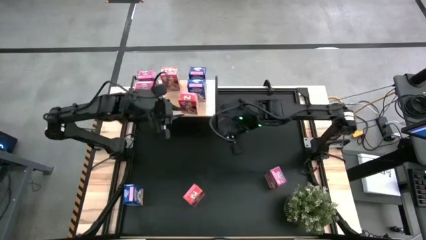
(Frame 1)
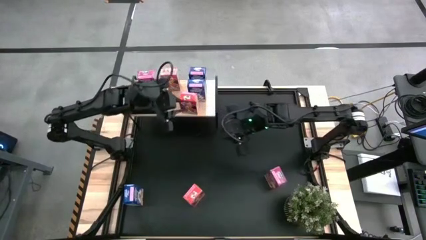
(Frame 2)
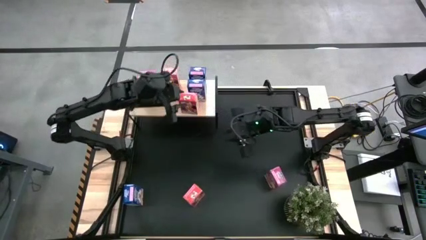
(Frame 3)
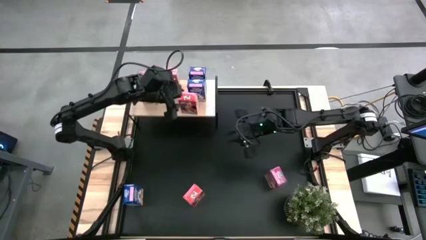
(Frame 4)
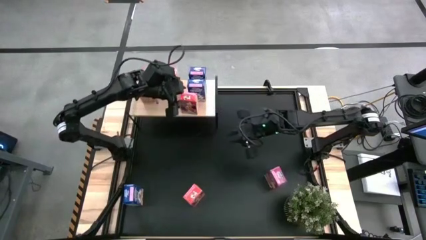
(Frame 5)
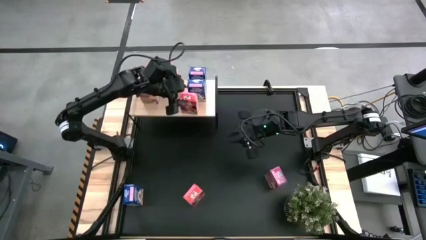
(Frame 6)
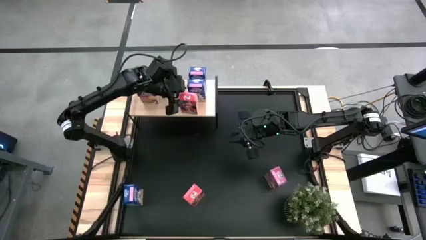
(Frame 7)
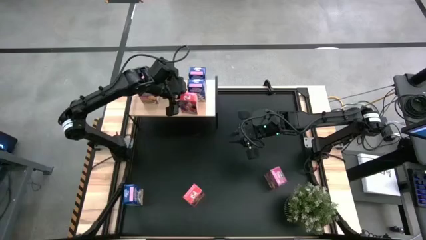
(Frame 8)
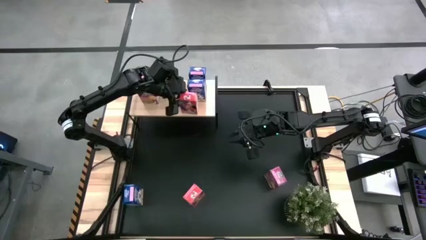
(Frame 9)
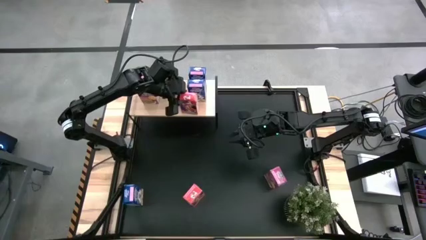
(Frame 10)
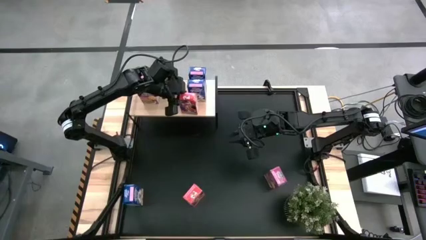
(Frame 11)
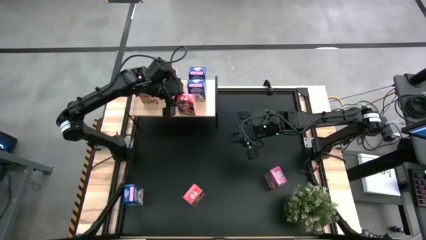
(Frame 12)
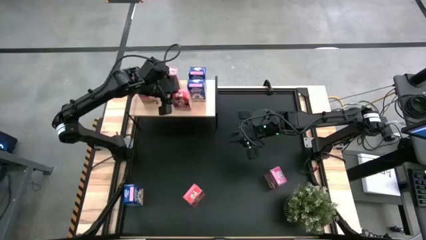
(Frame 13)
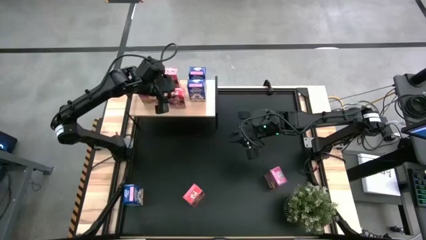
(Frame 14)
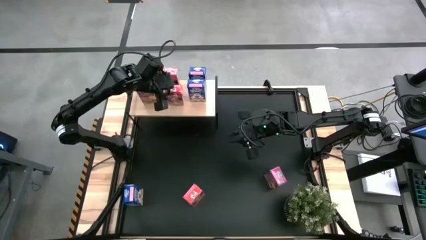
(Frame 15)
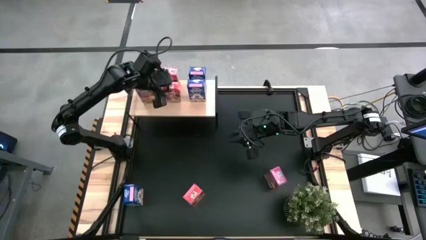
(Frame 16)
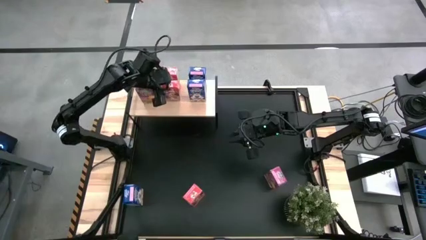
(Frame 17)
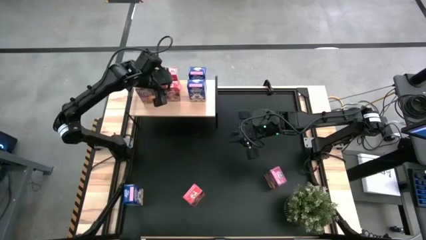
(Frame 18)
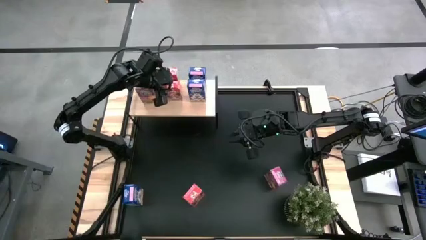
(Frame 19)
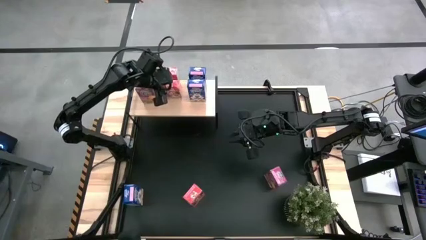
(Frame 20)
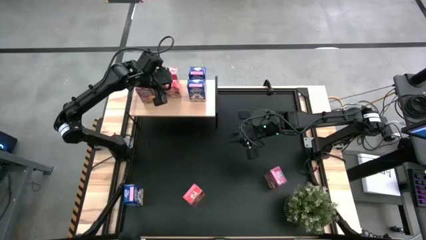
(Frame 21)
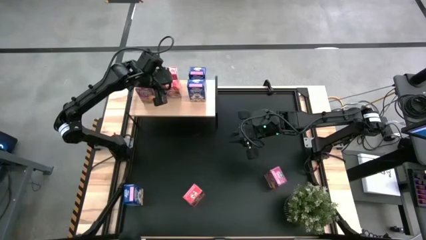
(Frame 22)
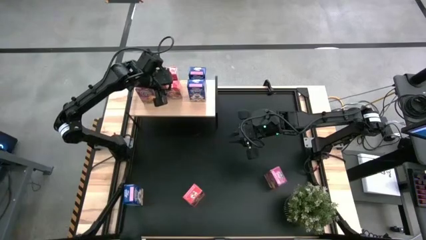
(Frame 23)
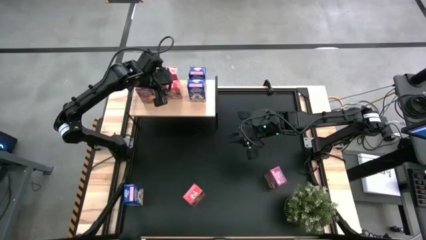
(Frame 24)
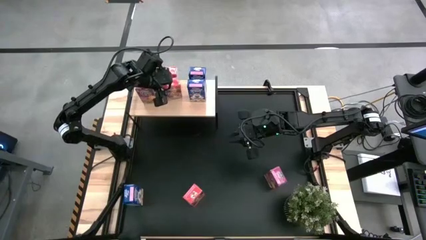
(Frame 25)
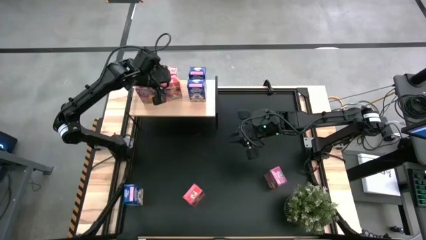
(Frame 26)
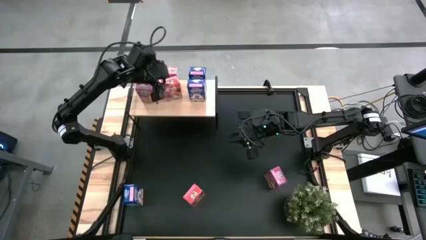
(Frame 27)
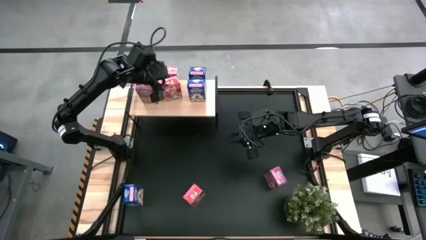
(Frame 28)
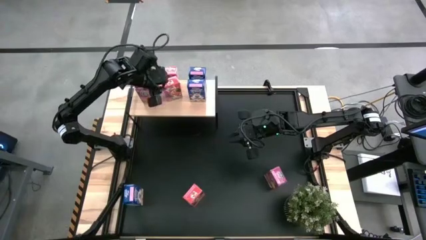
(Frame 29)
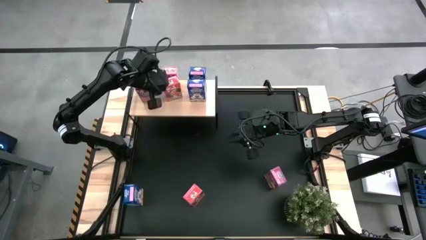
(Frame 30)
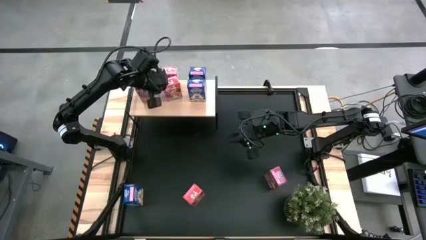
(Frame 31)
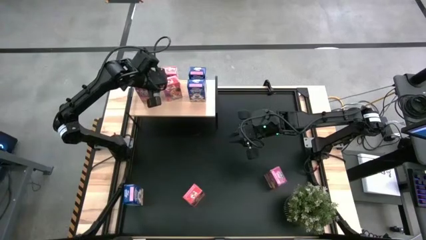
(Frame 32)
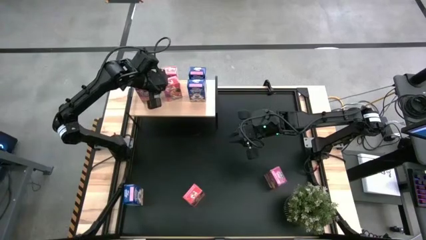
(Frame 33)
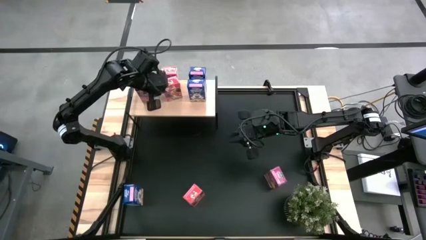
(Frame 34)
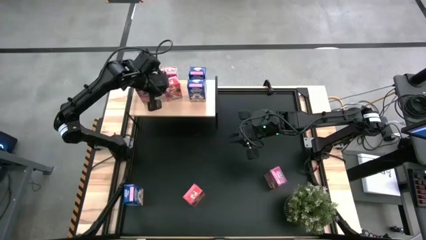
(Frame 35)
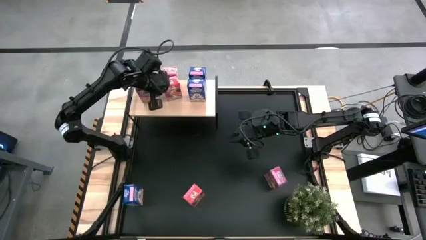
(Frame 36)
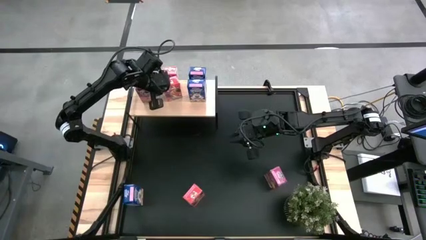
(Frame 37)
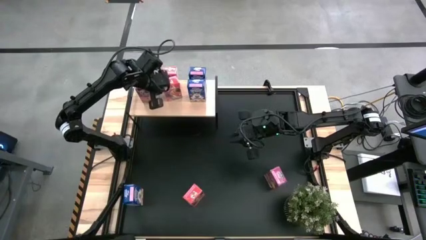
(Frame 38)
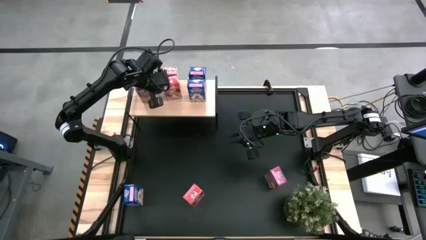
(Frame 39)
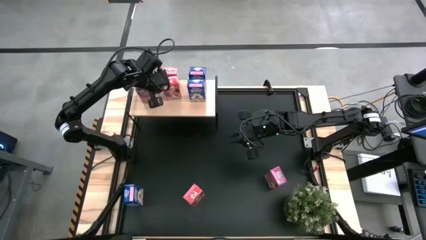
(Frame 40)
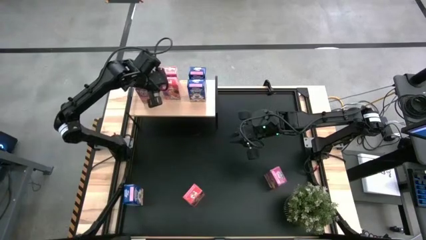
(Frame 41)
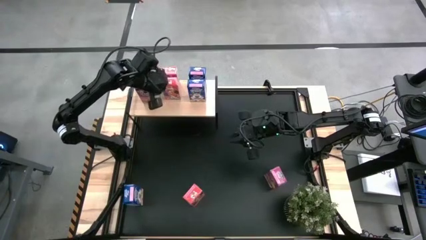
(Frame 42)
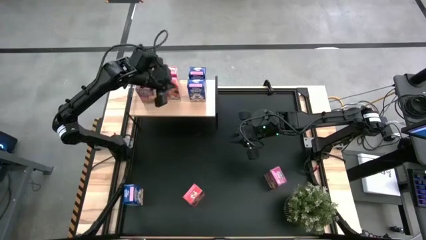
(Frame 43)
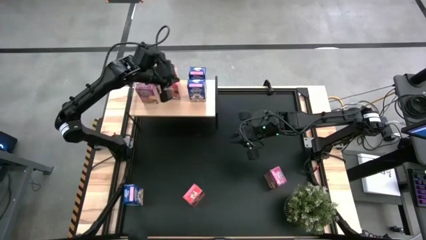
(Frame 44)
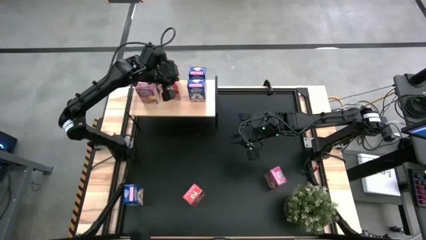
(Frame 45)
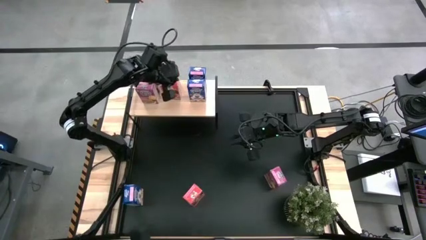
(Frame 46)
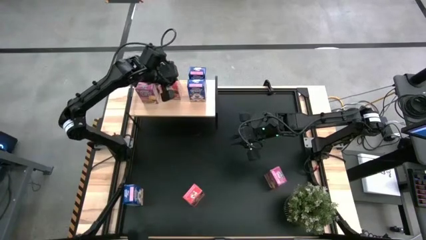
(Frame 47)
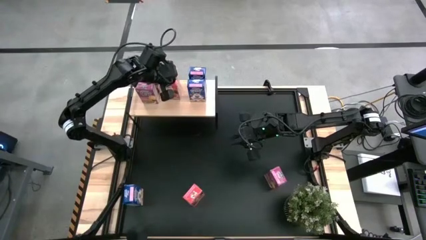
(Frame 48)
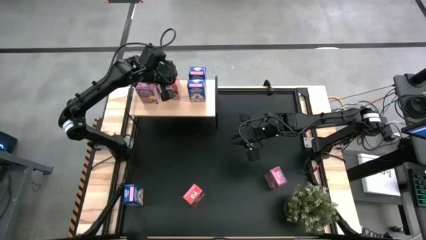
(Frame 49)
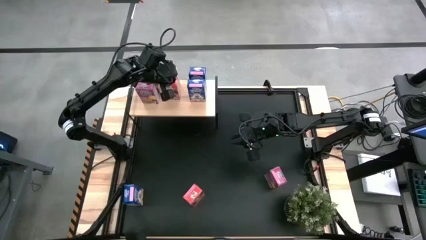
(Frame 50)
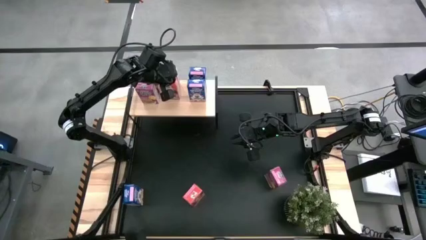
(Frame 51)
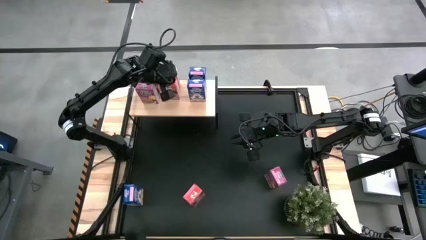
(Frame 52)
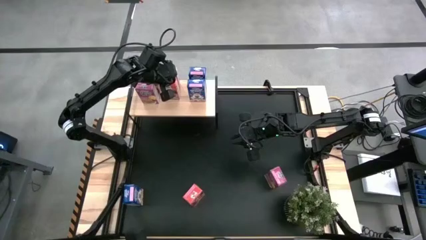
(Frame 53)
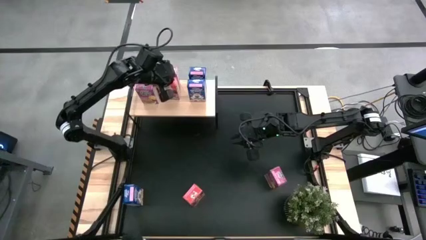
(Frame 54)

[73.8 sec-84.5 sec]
Task: Stack cereal on shelf
Align the right red cereal box with the other red cereal box on the shelf
